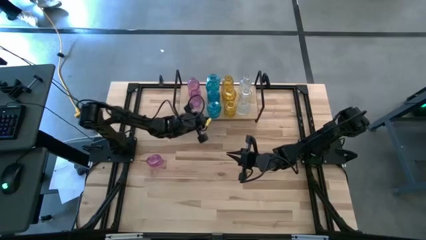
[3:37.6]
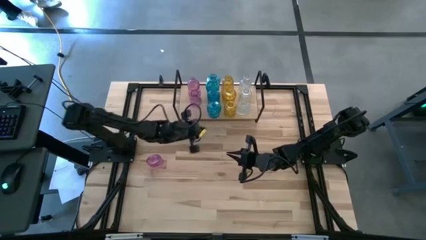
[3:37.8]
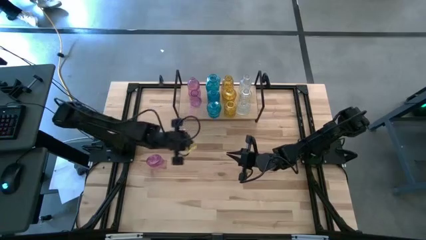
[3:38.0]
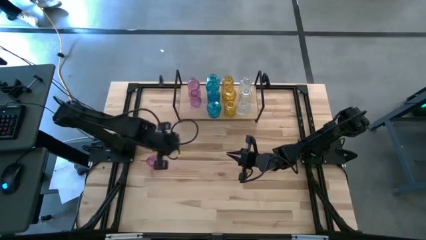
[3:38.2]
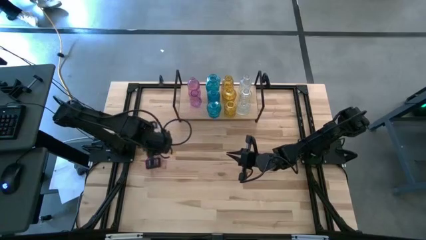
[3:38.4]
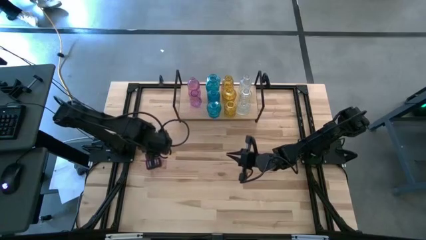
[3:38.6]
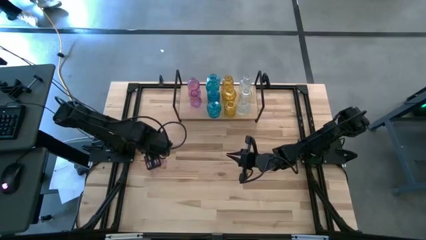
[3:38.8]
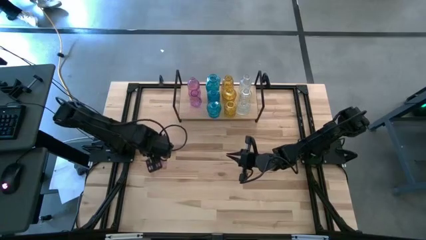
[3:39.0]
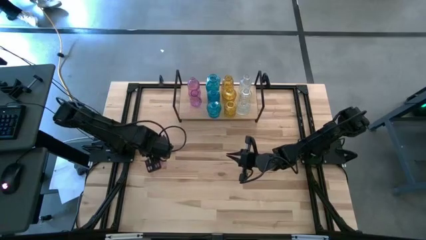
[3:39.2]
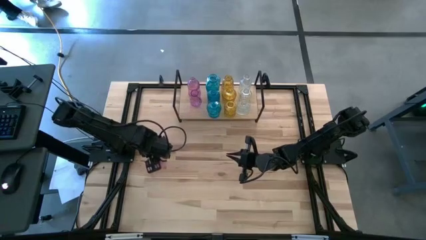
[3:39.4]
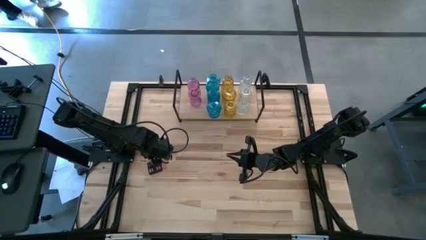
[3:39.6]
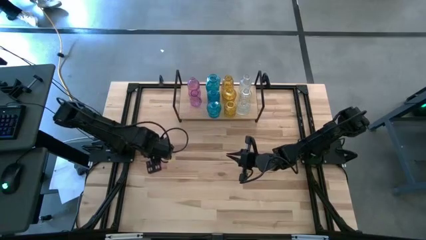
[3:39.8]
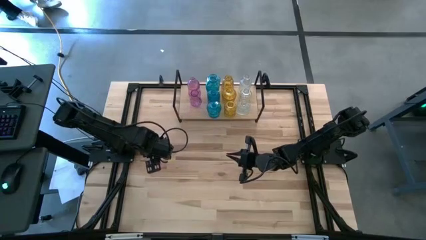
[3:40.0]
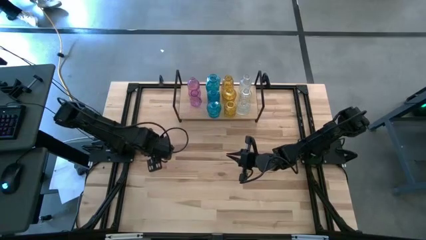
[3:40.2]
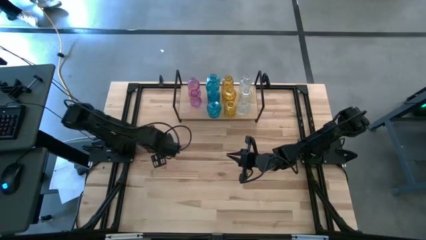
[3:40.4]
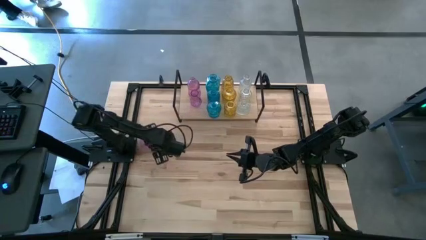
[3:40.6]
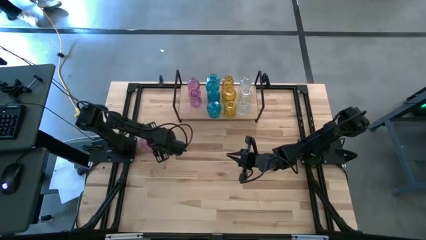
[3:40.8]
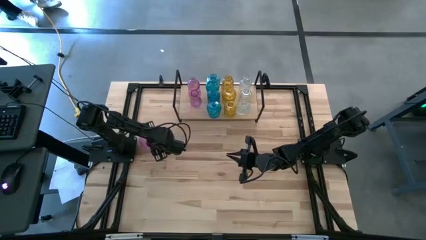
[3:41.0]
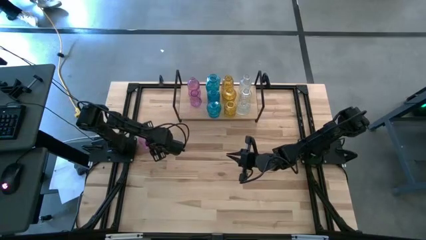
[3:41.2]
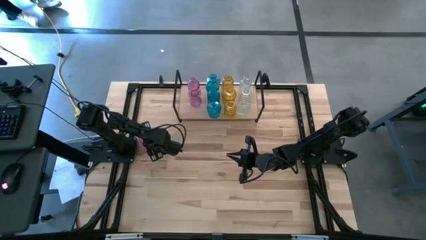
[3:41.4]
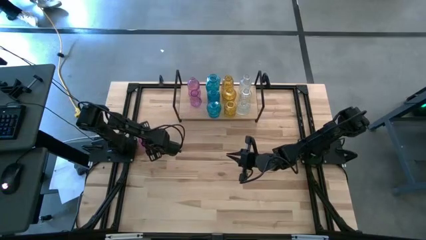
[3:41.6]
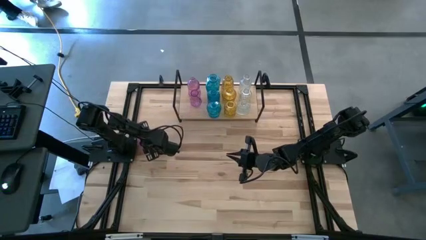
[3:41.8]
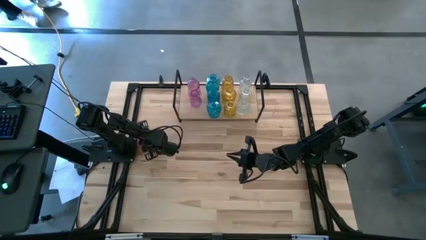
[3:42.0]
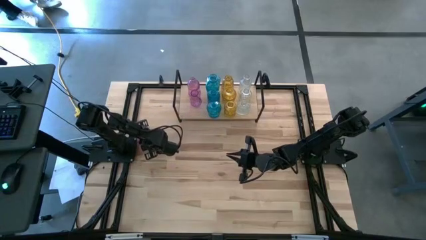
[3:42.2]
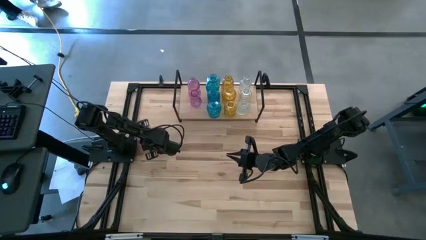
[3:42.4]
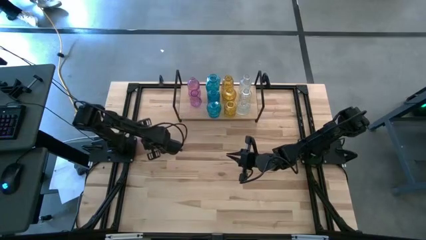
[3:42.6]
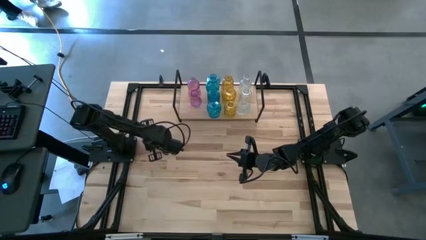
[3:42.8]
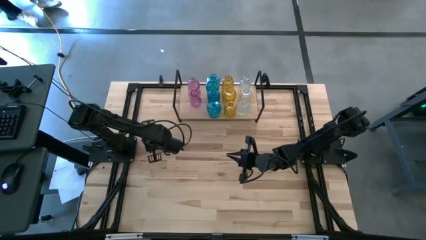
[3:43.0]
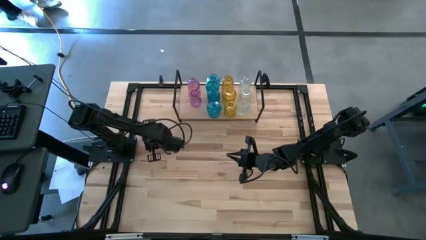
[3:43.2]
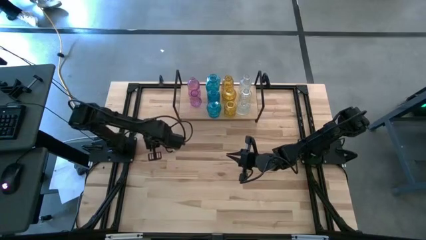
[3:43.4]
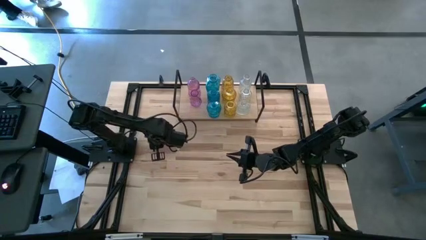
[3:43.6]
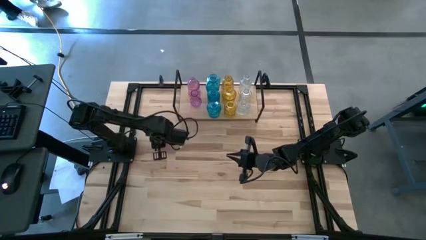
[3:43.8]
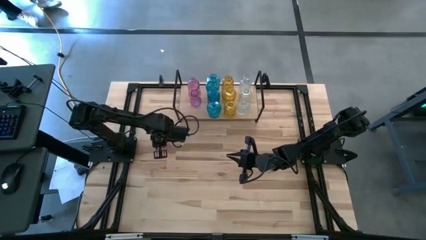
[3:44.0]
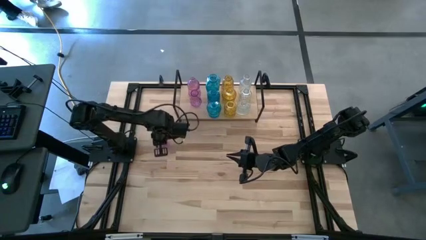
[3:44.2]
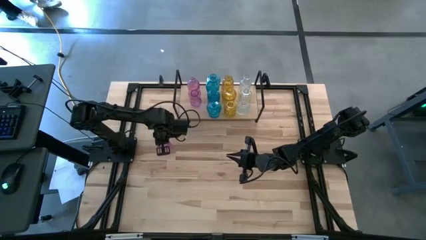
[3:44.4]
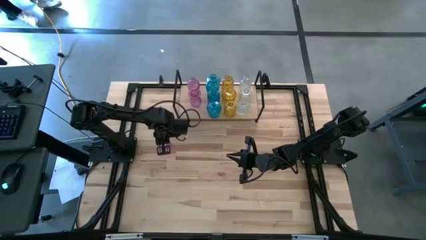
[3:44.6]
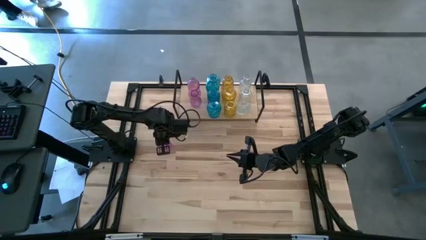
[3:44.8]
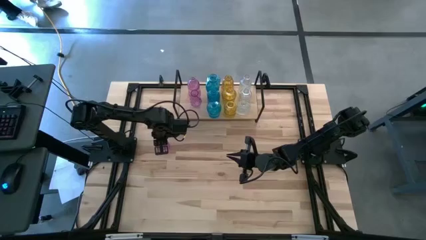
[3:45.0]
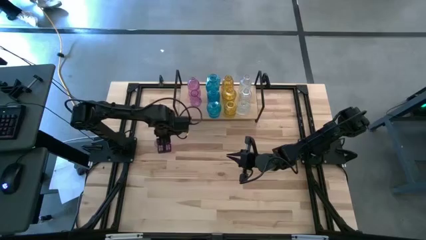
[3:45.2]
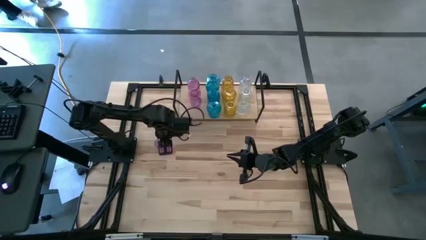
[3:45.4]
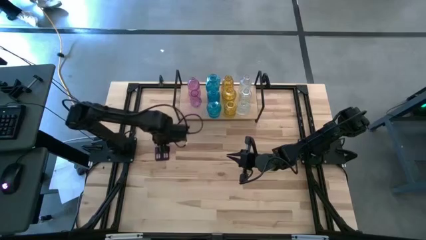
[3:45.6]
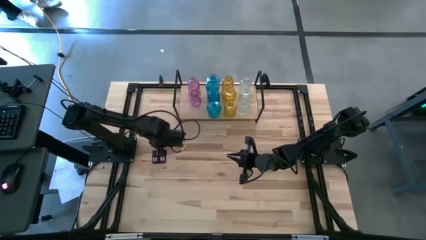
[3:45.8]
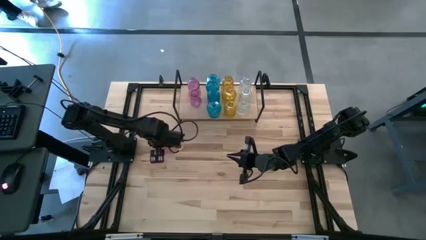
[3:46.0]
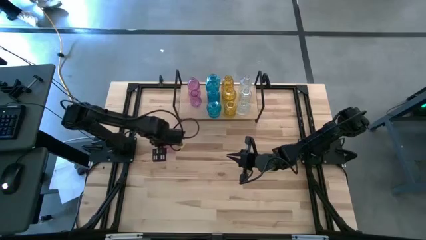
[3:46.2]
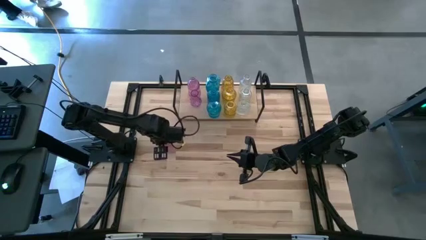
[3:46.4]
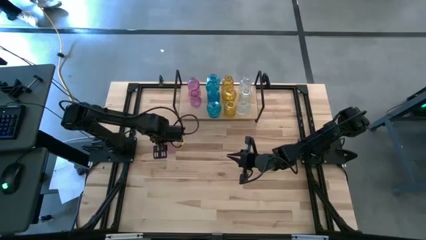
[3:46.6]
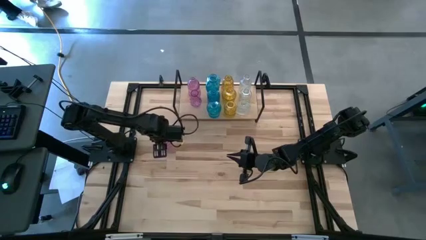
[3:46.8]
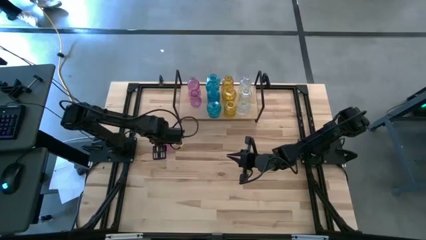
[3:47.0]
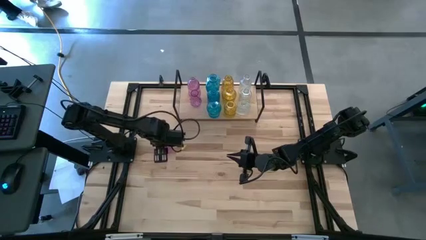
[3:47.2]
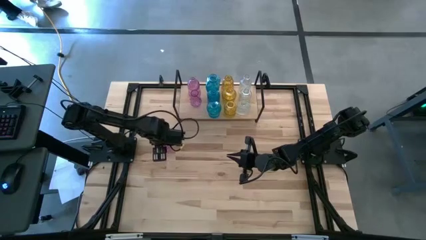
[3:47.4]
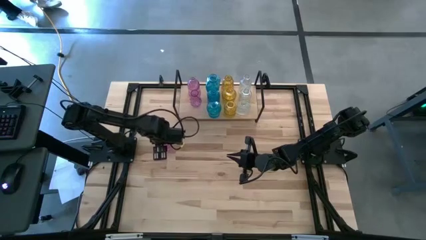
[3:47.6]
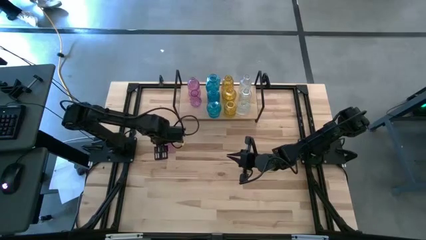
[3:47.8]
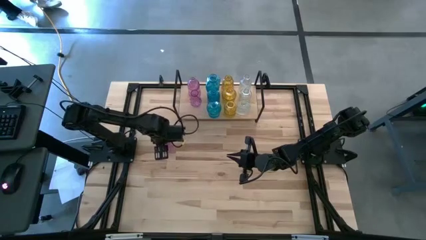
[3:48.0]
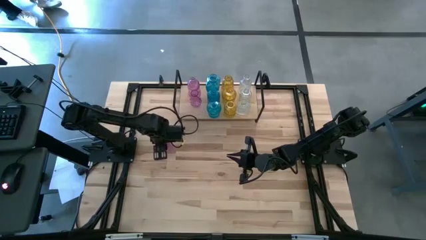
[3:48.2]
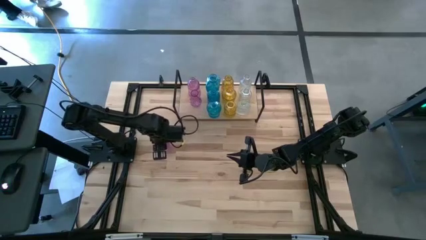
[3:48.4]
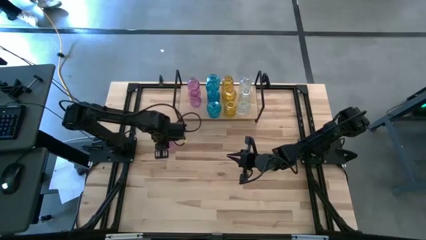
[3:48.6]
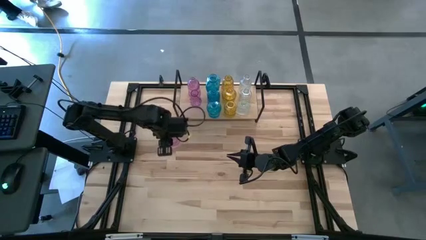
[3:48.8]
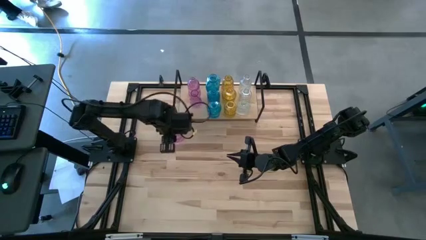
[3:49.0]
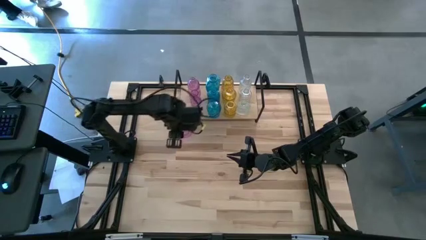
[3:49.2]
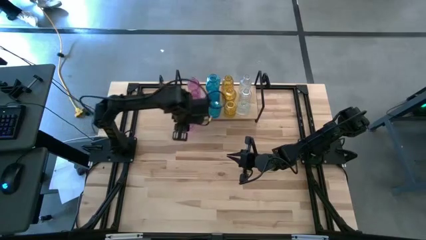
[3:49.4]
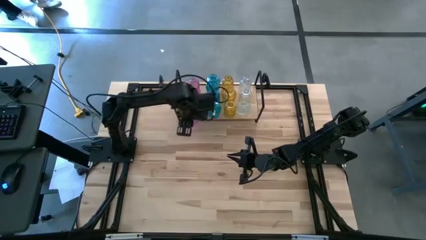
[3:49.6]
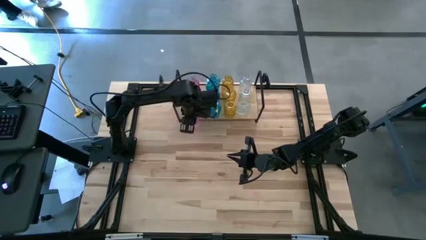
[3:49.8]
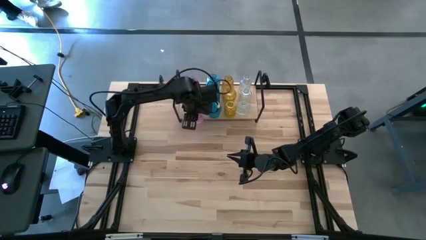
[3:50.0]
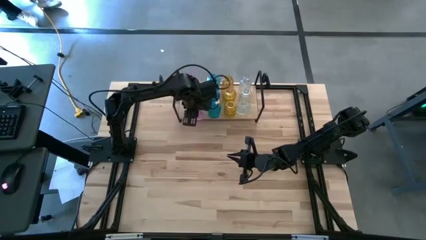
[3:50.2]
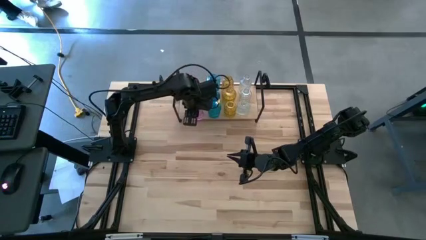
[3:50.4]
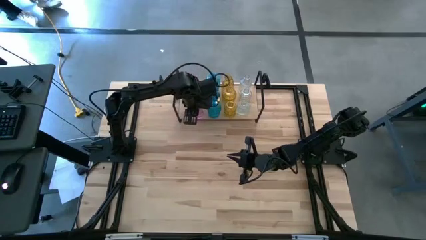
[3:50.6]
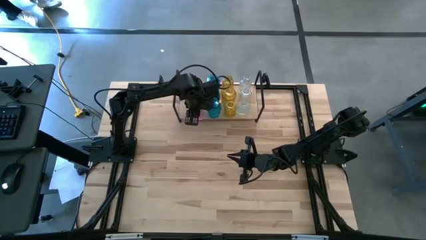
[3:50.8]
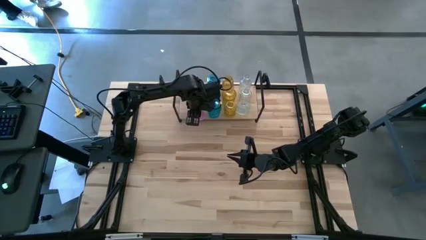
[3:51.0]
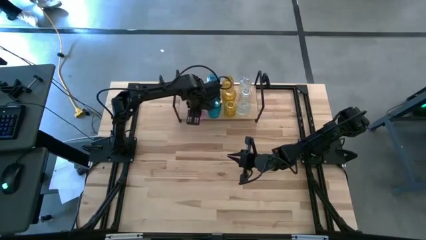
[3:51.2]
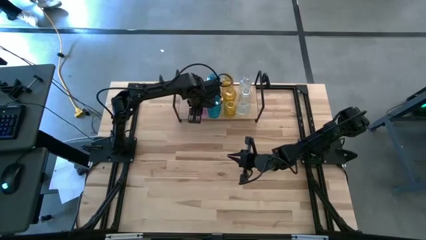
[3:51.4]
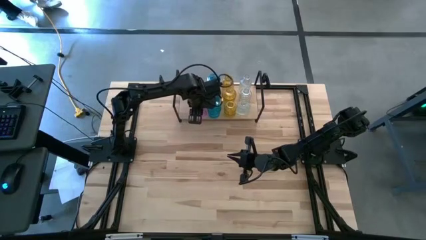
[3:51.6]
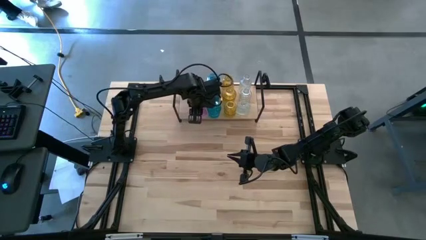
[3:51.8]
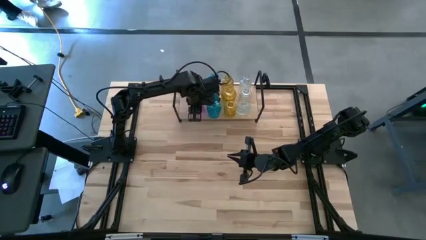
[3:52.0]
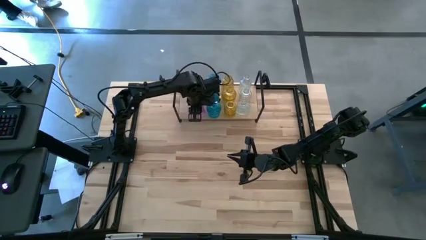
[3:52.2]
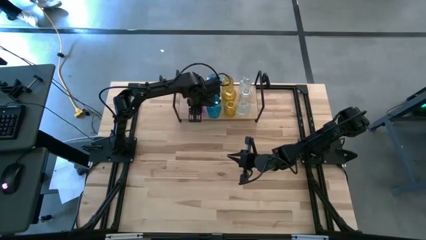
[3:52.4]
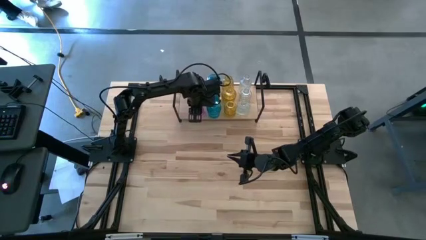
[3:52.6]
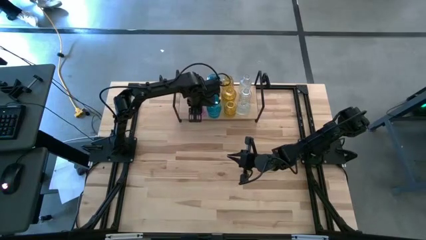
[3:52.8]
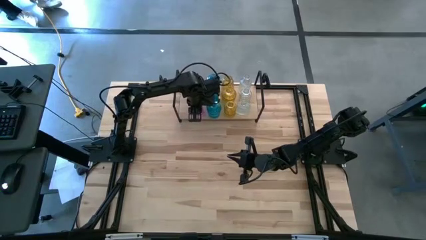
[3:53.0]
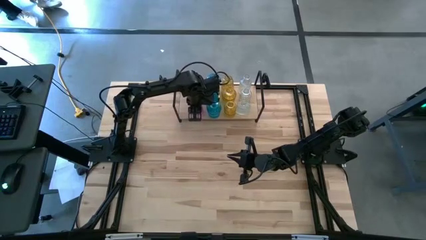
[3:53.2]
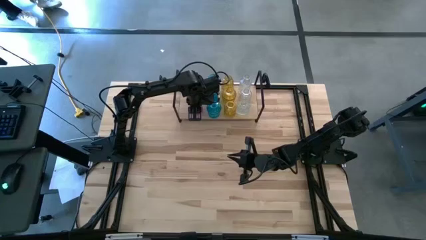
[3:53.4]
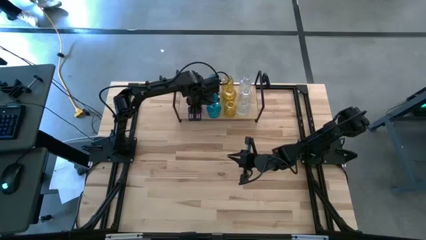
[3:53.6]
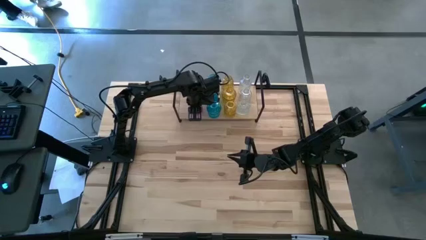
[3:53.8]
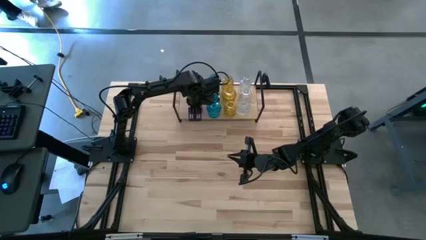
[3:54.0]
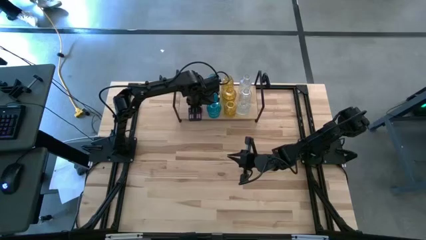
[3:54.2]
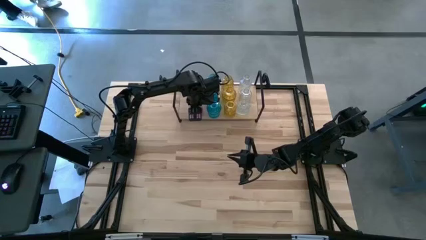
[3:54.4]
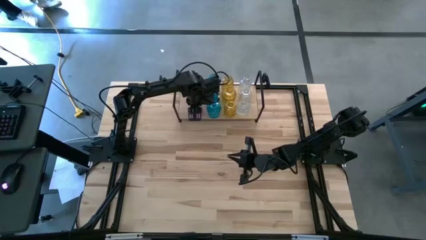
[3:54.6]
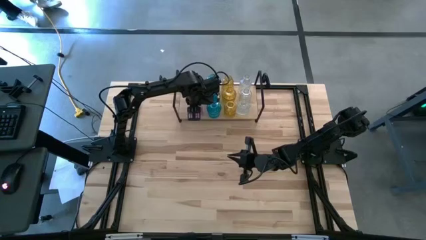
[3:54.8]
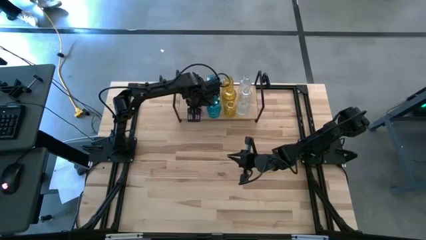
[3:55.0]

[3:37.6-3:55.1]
Task: sort vases onto shelf
Put the pink vase on the shelf aligned with the other pink vase
